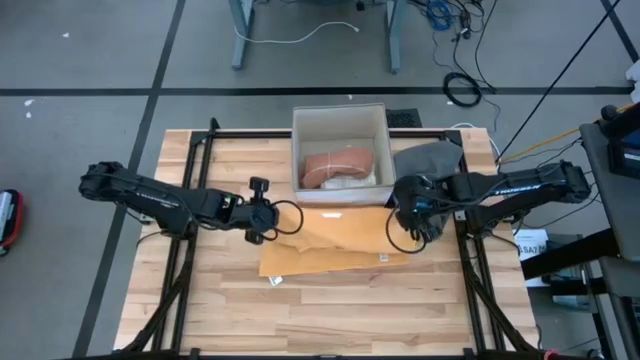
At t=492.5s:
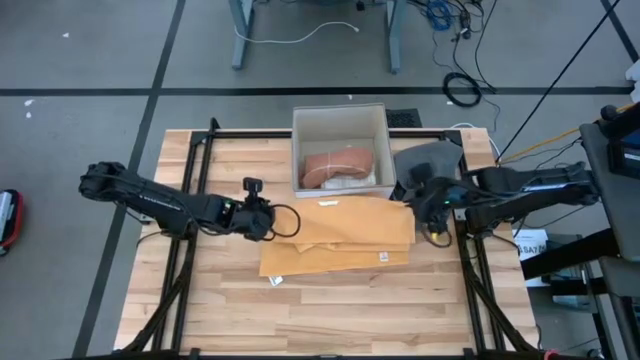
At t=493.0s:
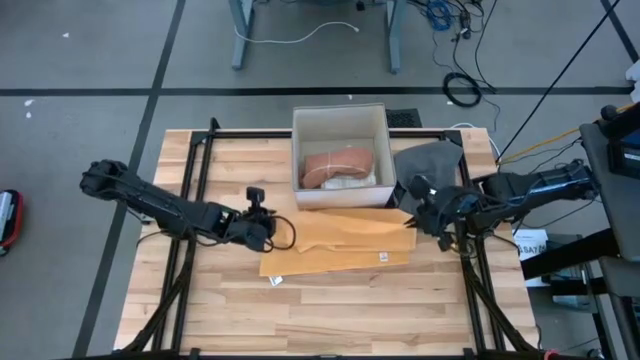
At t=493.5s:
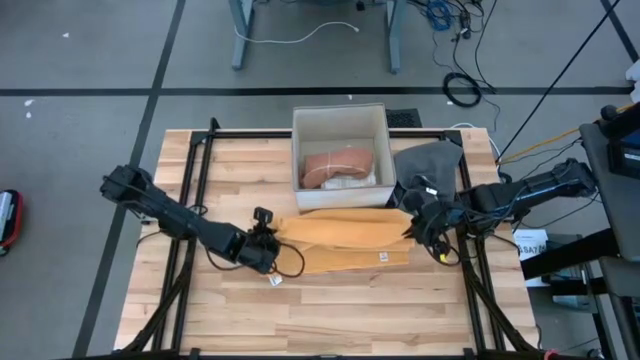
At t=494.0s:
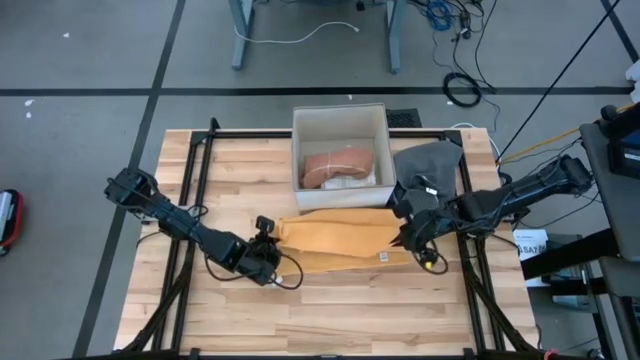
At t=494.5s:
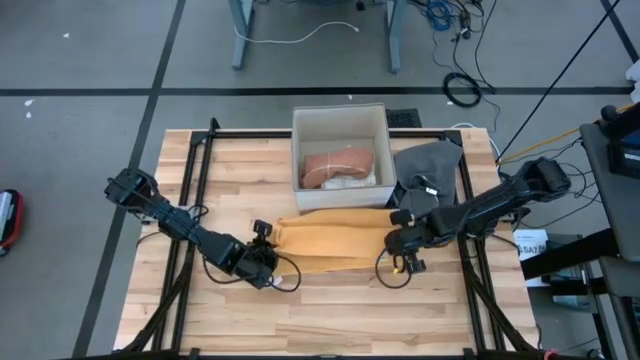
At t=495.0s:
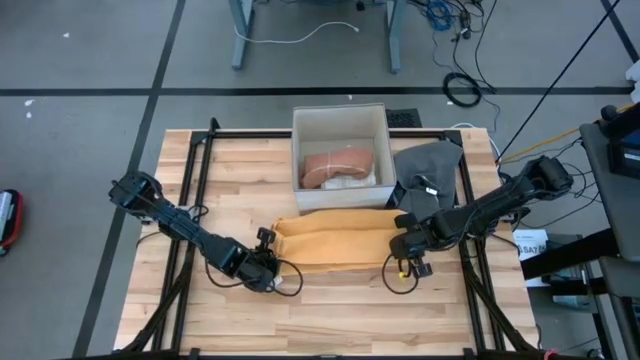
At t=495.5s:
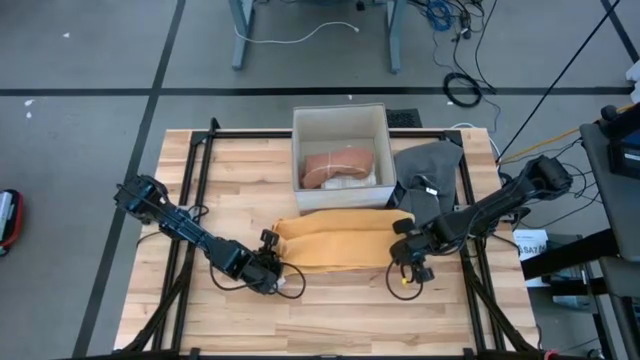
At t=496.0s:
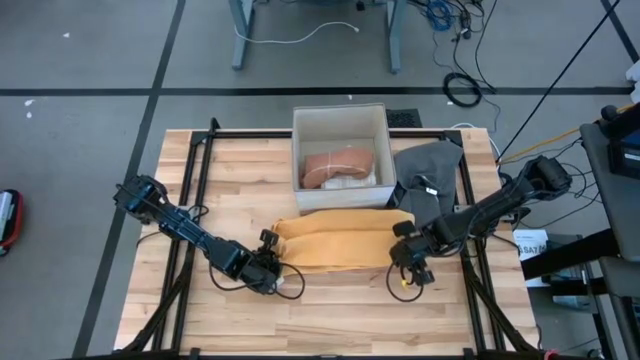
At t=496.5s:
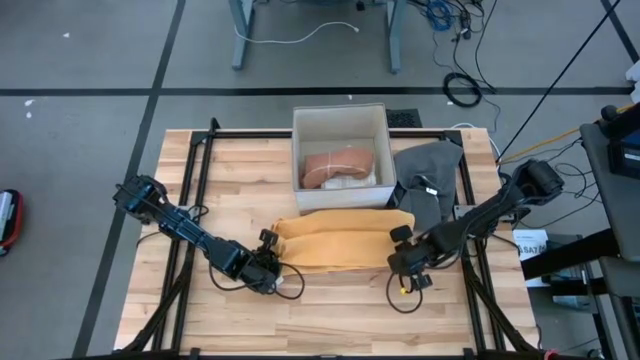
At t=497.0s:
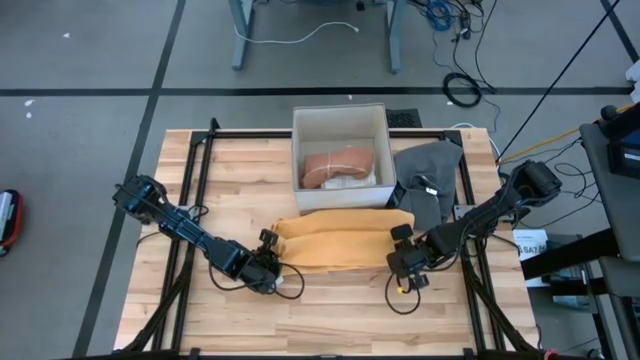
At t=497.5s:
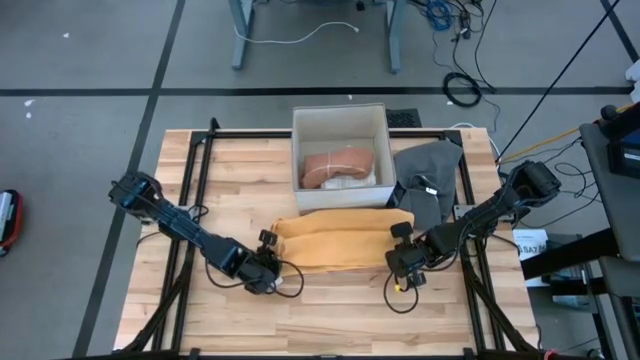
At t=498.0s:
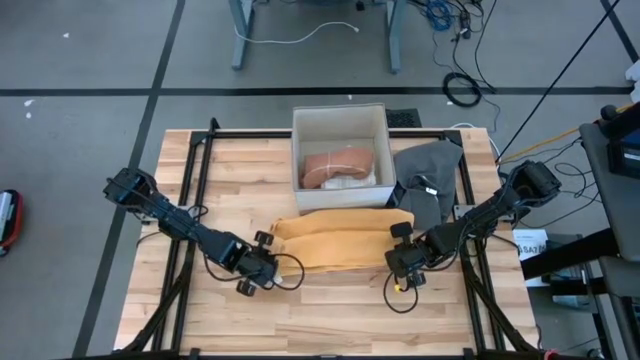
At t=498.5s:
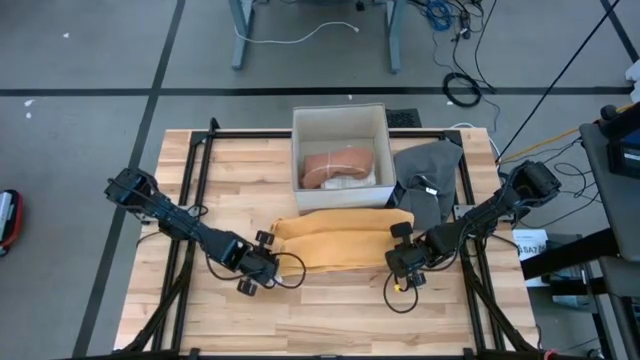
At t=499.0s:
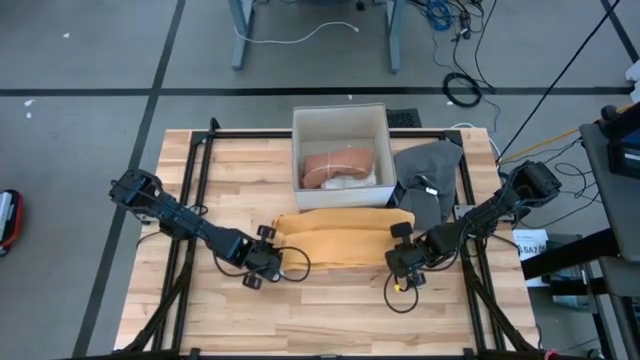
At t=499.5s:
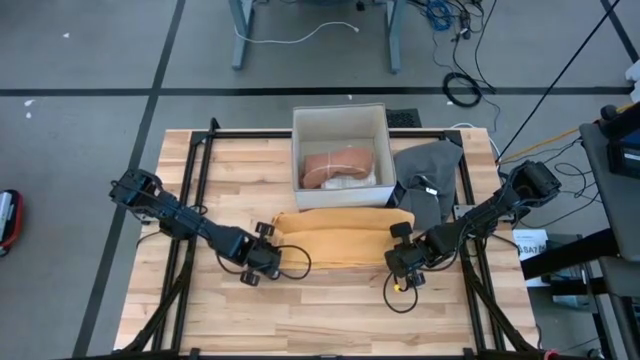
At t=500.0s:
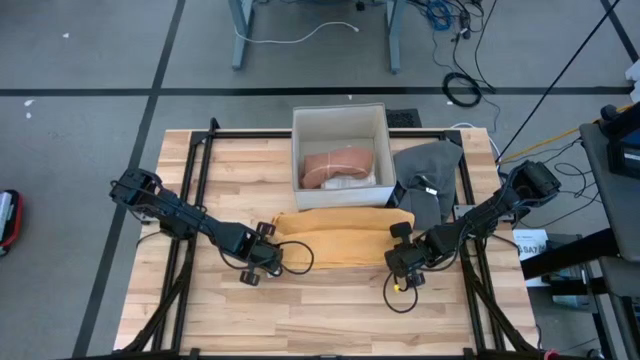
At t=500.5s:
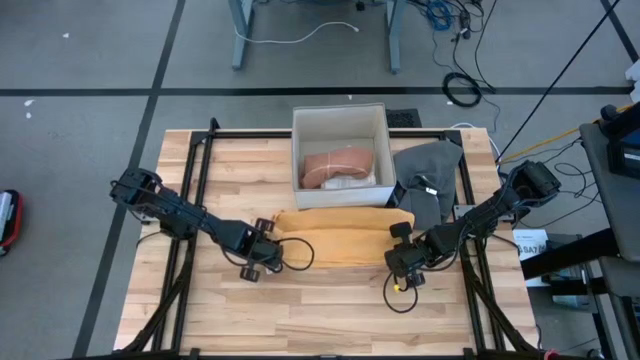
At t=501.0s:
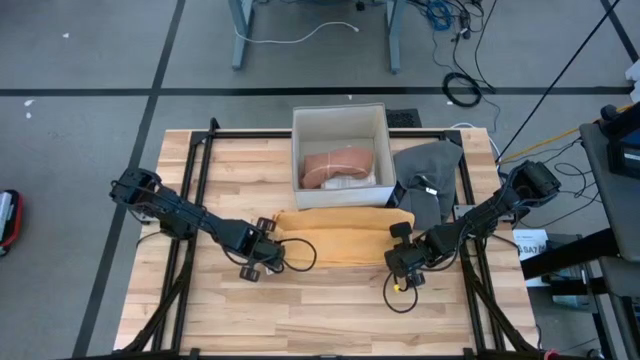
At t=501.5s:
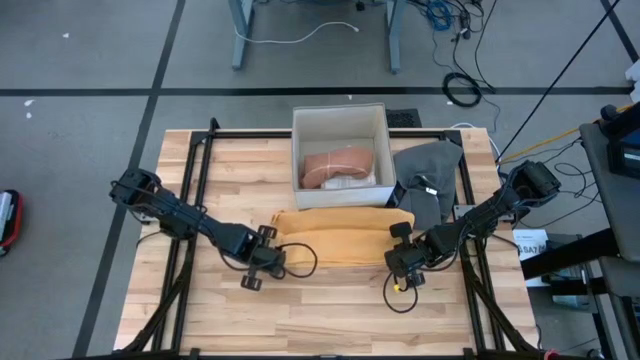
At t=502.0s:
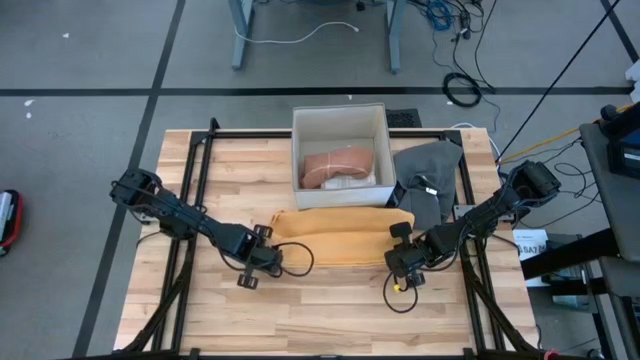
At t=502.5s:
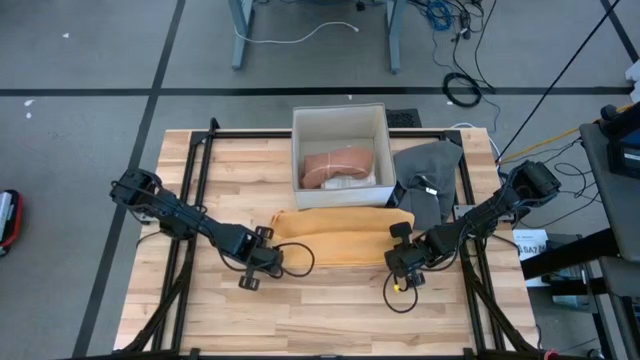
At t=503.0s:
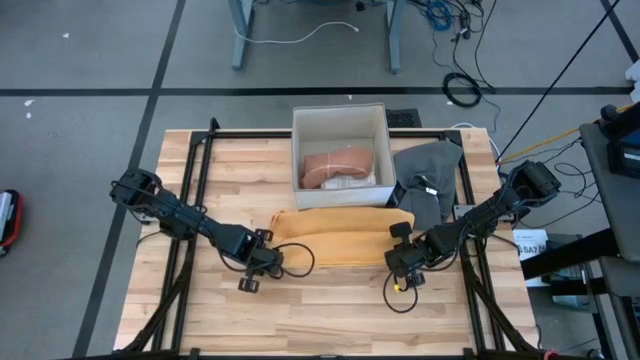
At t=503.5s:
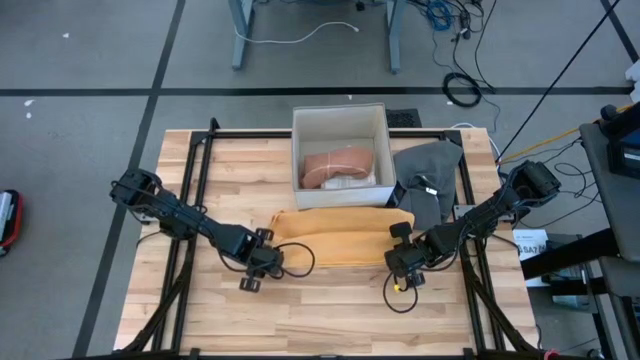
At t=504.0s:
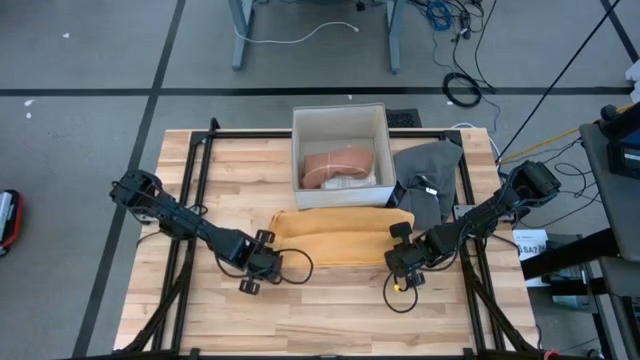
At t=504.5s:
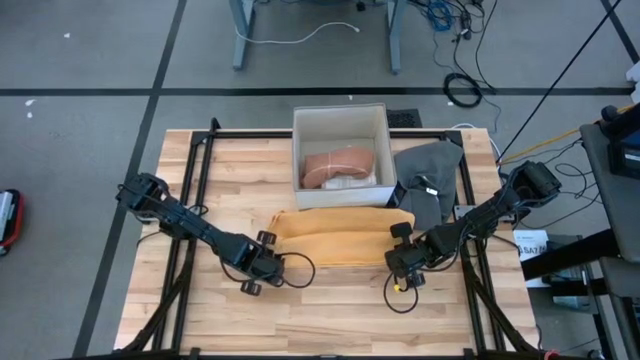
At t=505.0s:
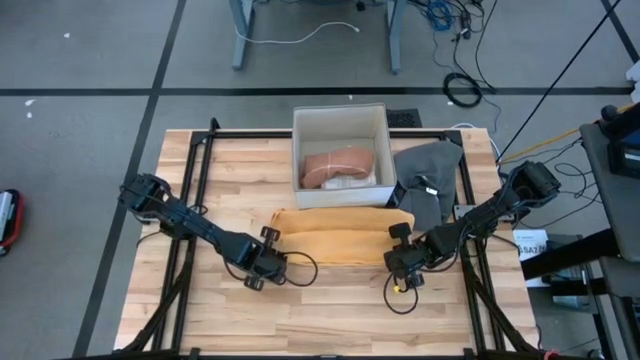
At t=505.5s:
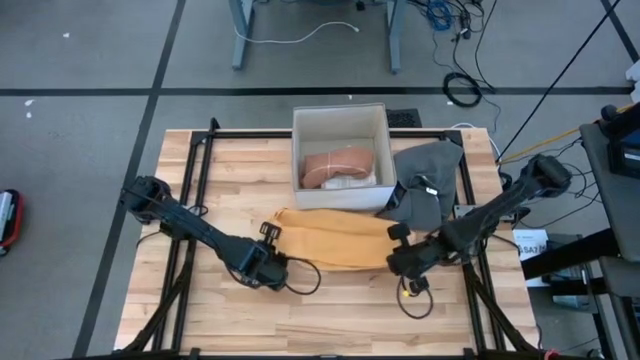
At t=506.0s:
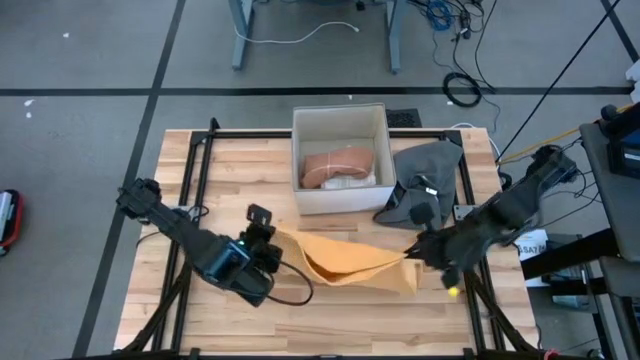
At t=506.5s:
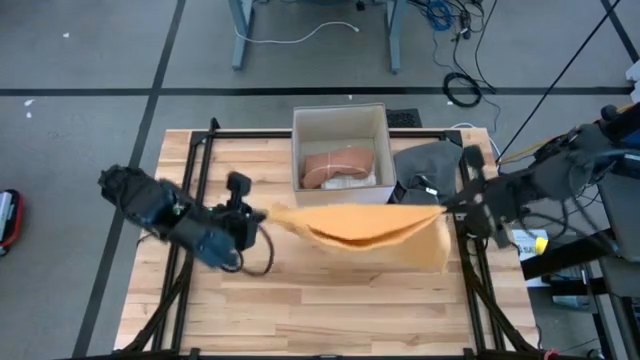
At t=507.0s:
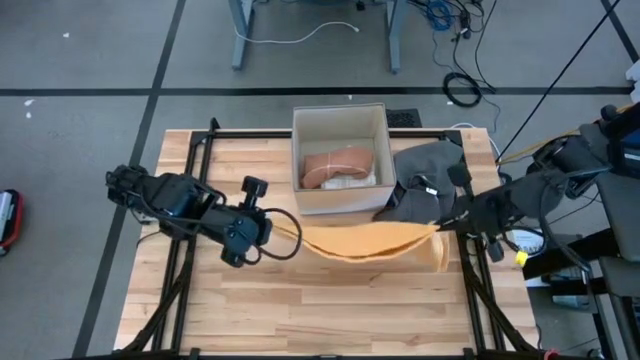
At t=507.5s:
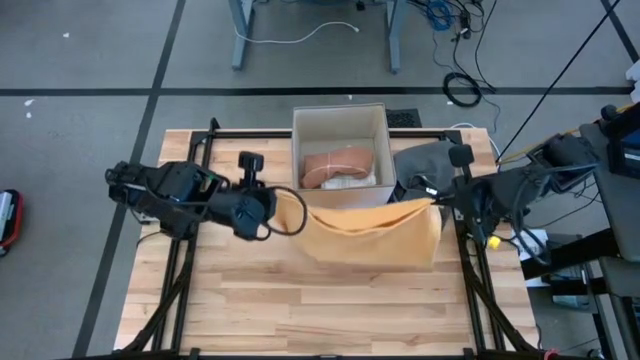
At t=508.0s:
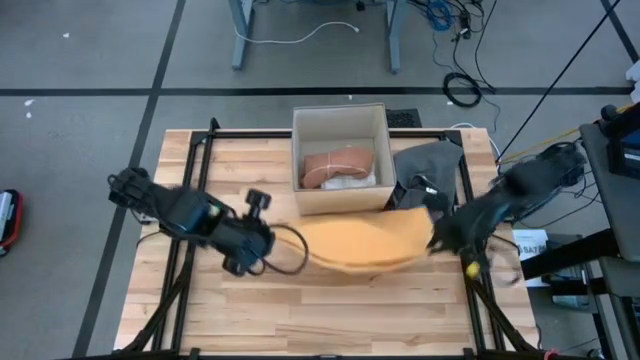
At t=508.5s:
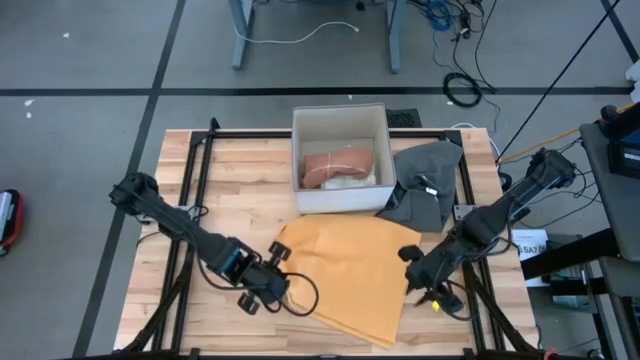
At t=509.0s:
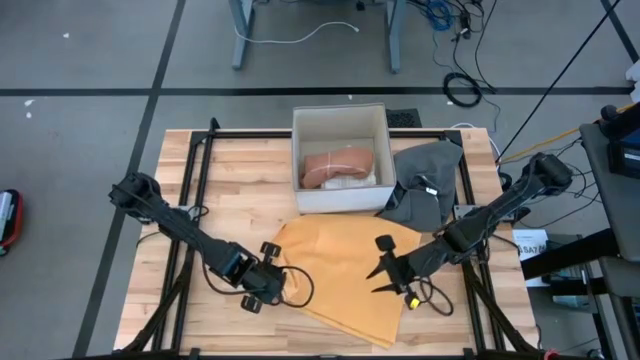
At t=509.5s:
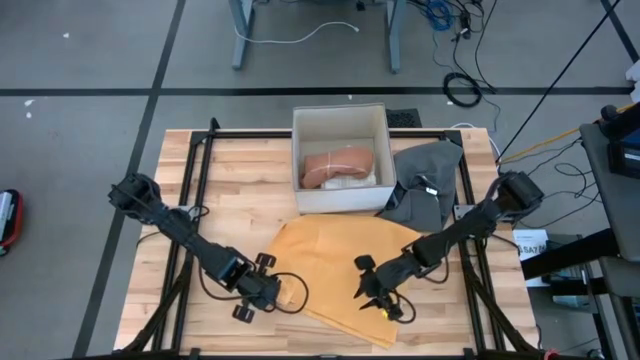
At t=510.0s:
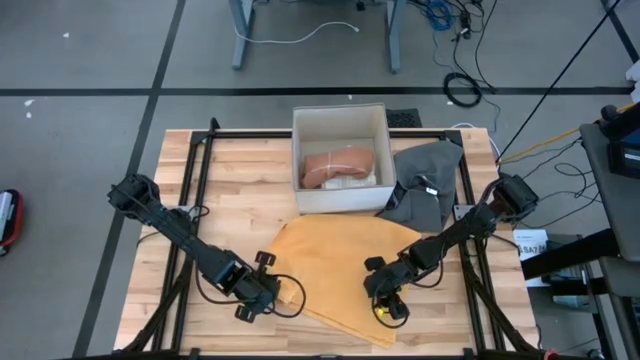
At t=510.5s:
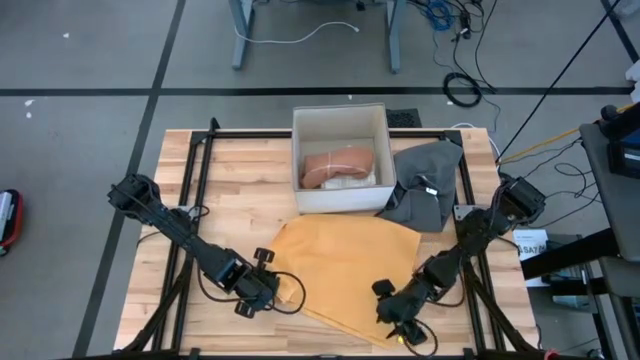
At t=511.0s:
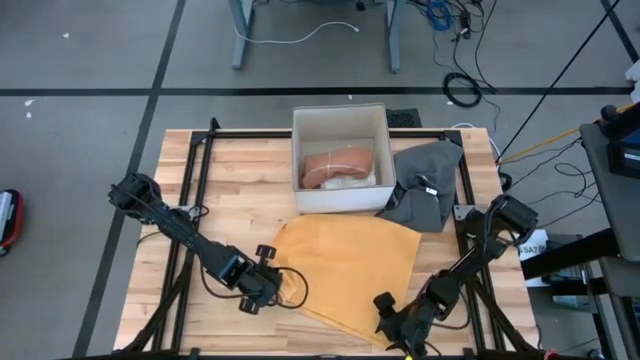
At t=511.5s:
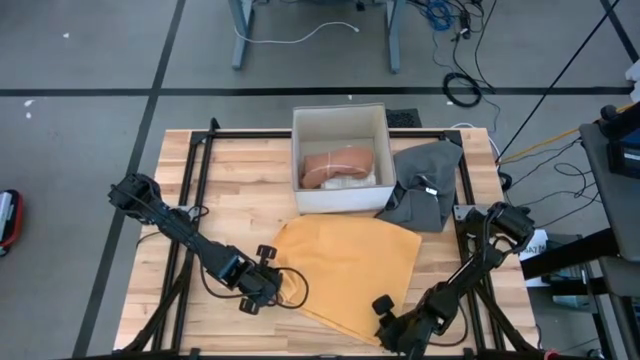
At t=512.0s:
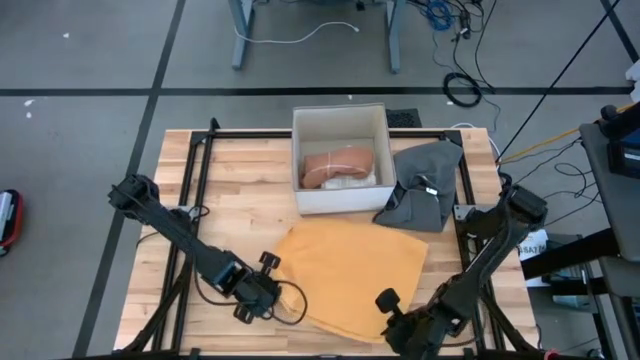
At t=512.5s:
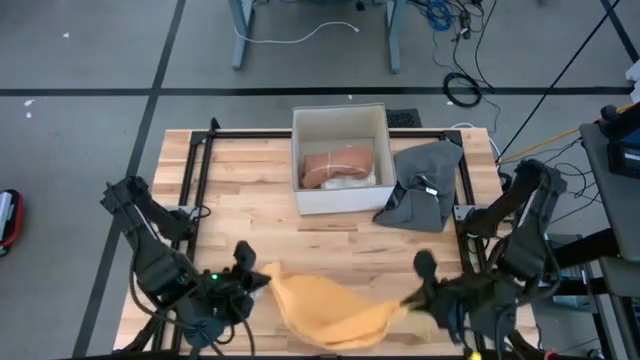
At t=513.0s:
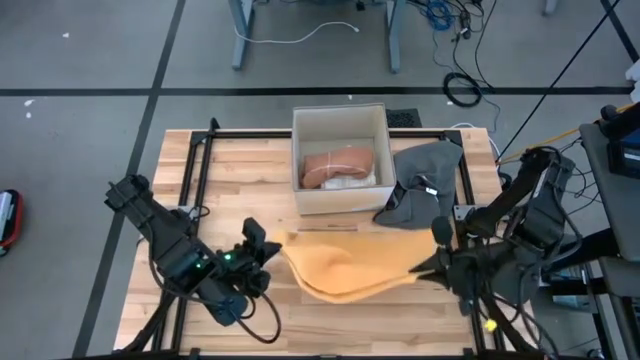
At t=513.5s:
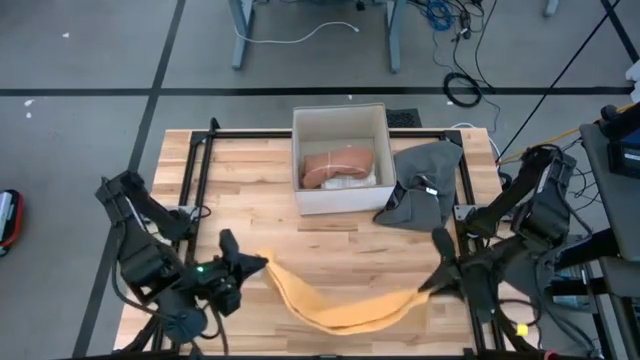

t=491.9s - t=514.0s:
Task: Fold towel
Fold the orange towel
